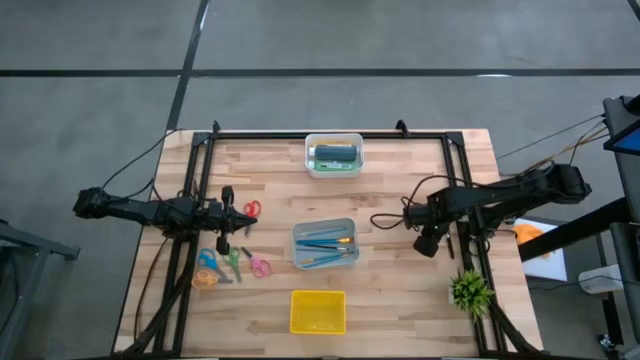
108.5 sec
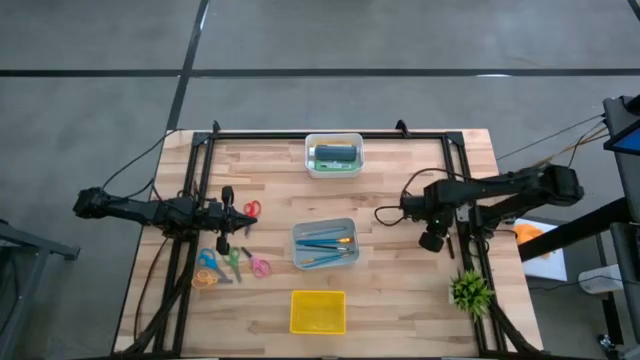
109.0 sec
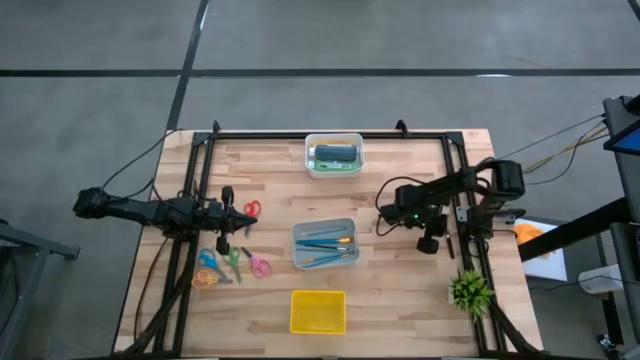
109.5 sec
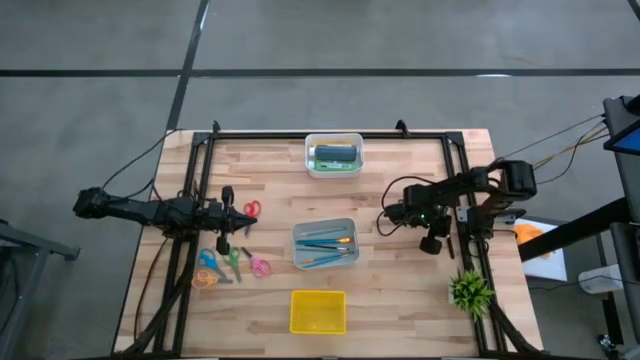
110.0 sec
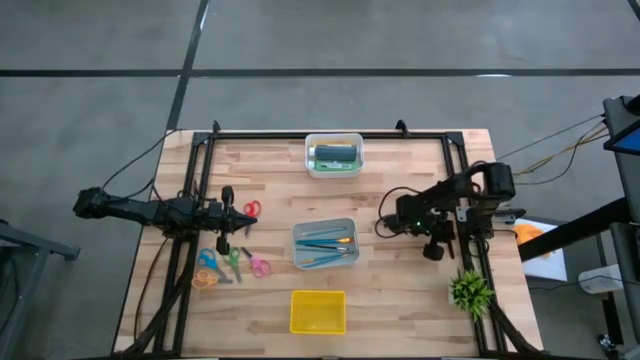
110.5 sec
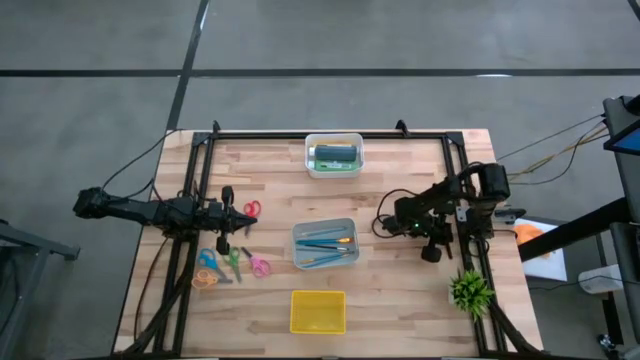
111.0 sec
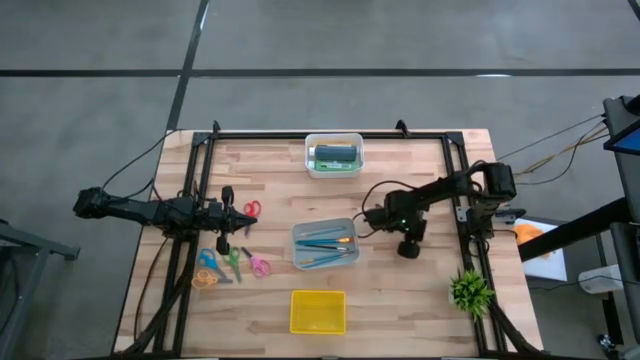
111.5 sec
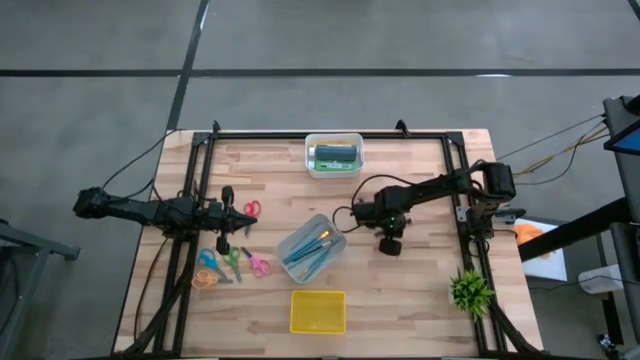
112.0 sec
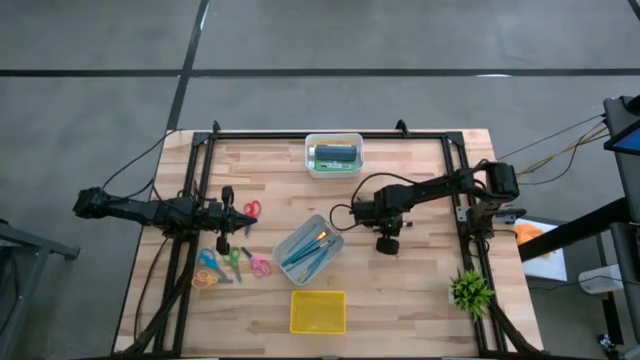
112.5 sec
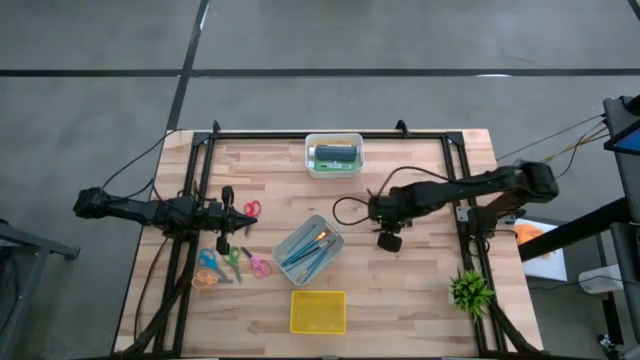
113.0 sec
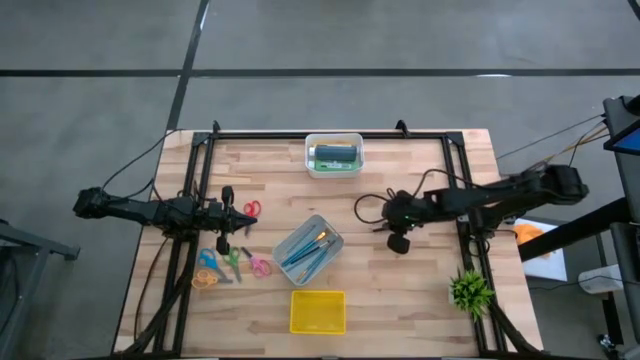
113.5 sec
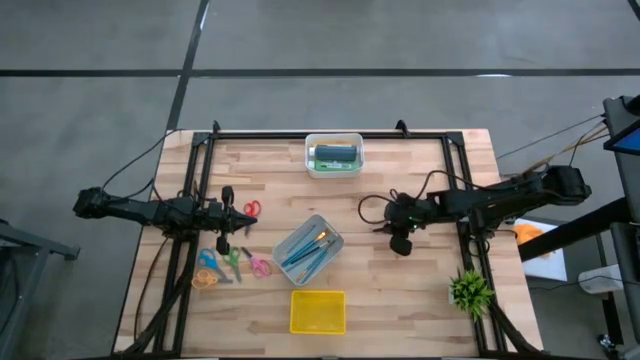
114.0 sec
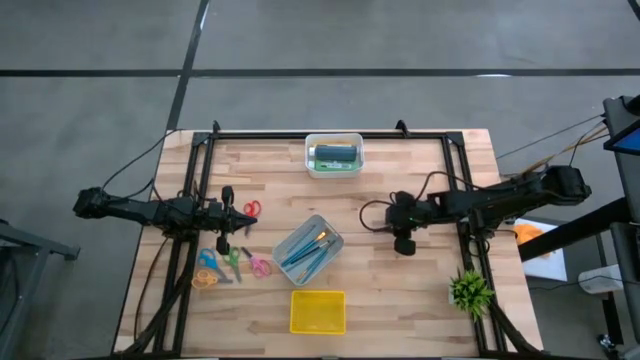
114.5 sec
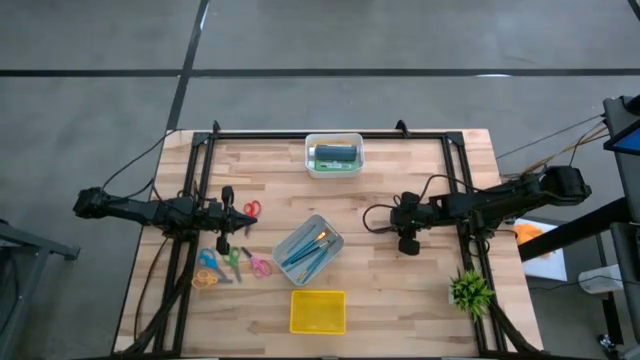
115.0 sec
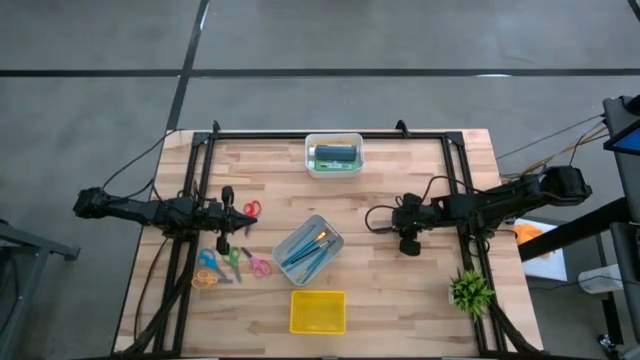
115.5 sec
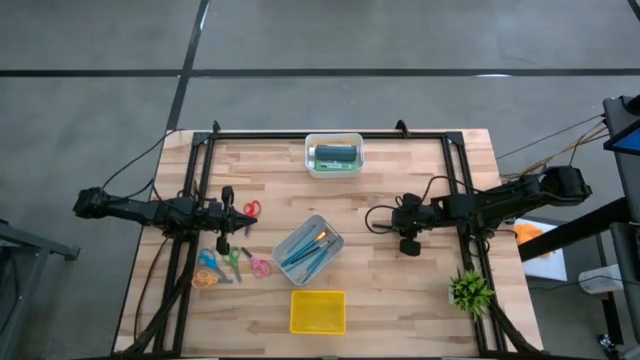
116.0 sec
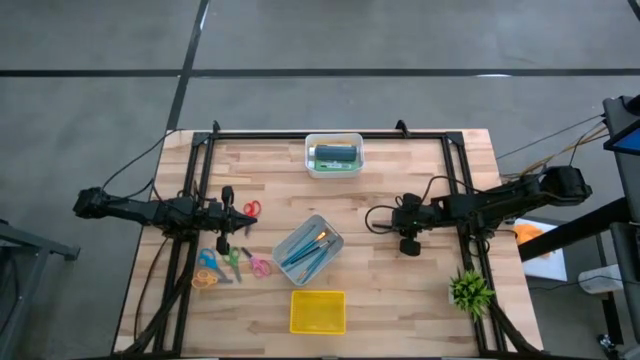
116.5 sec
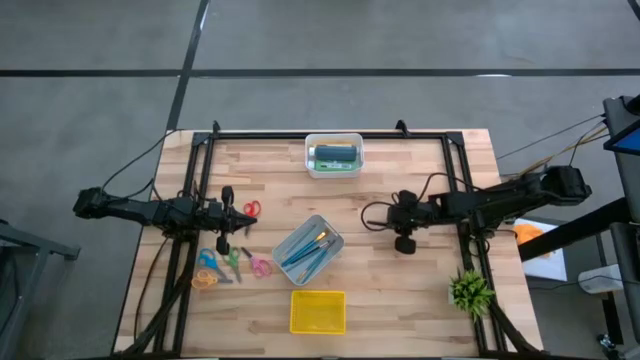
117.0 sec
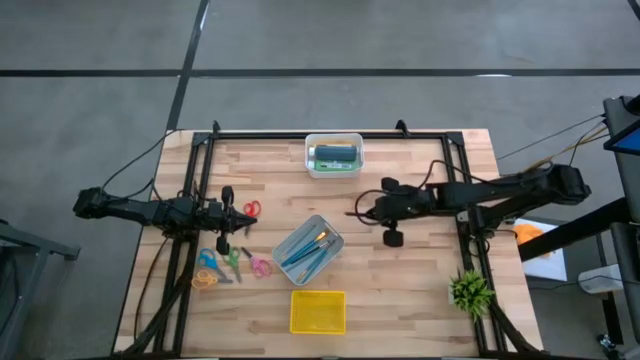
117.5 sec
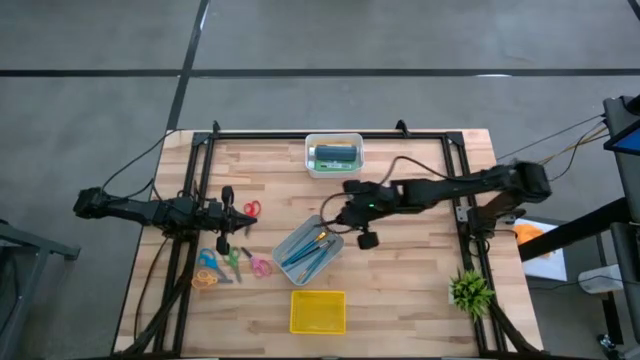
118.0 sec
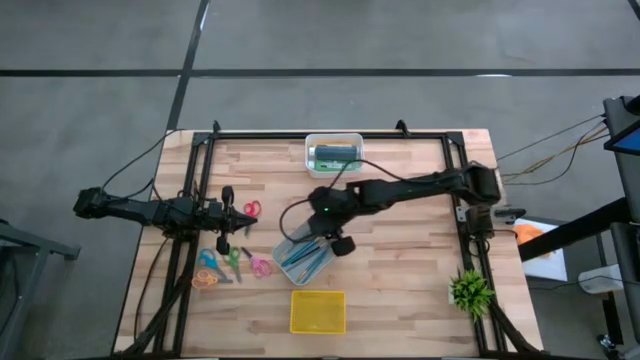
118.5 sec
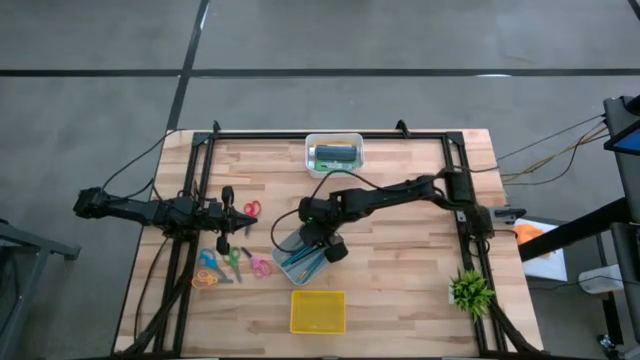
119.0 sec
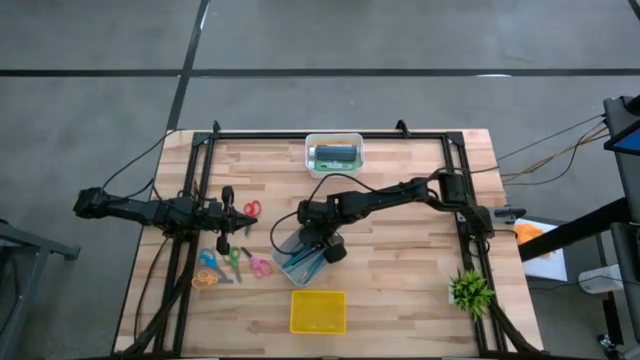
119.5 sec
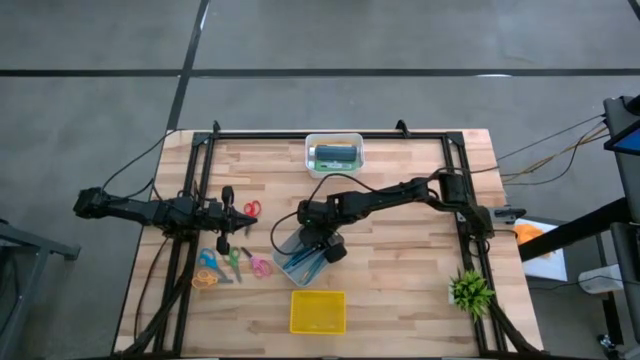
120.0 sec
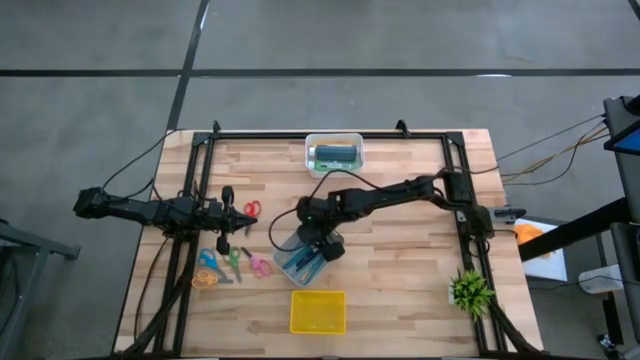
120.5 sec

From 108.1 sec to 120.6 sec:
Task: Pick & Place Paint Supplies
Put the black paint brush into the gray bin

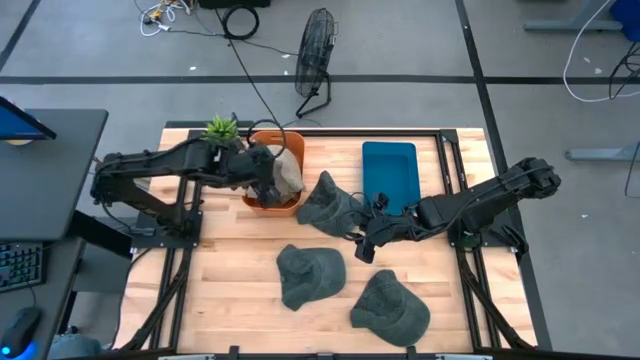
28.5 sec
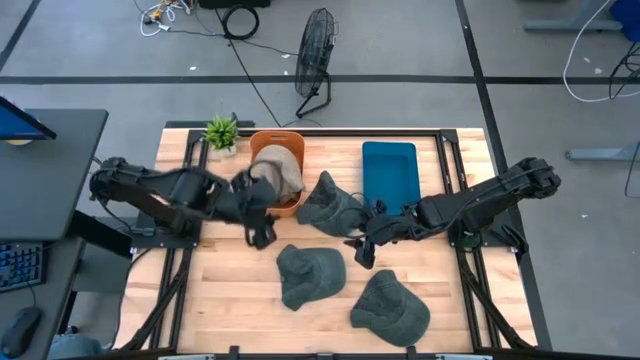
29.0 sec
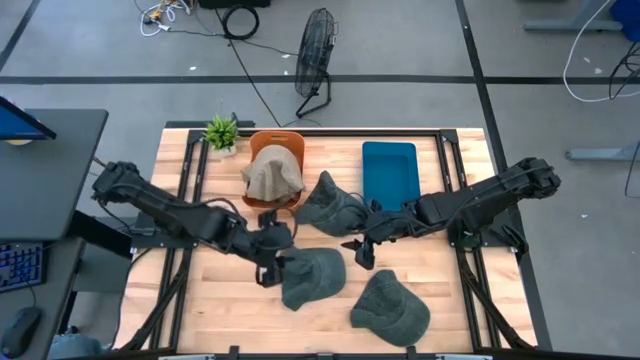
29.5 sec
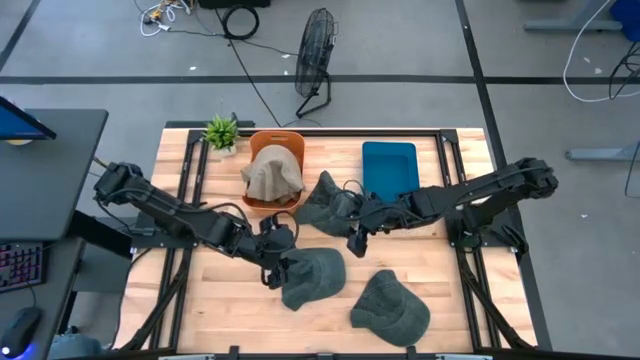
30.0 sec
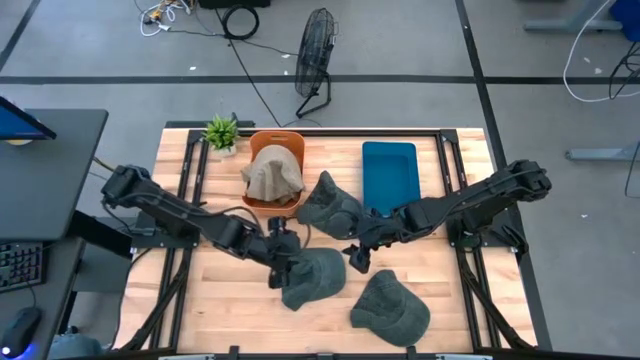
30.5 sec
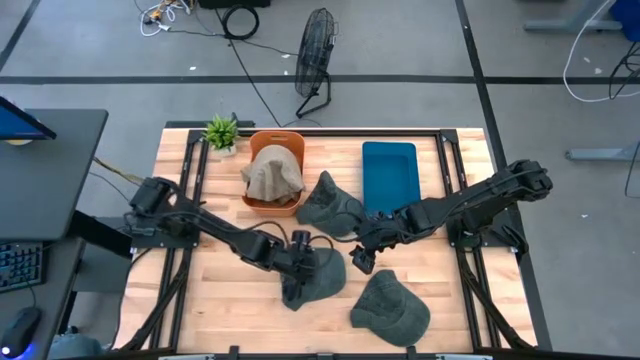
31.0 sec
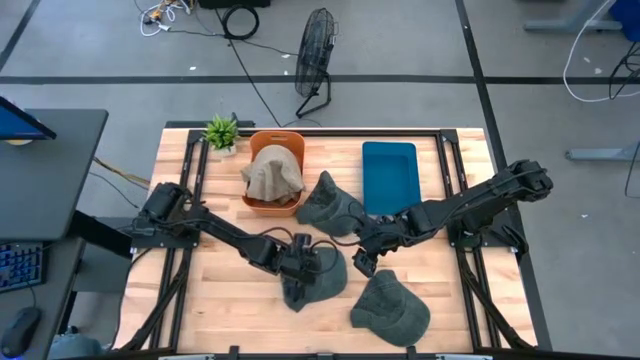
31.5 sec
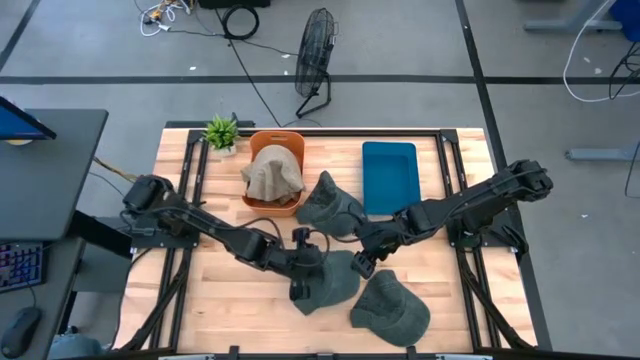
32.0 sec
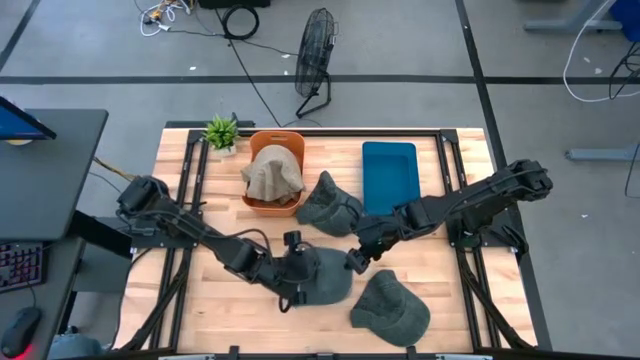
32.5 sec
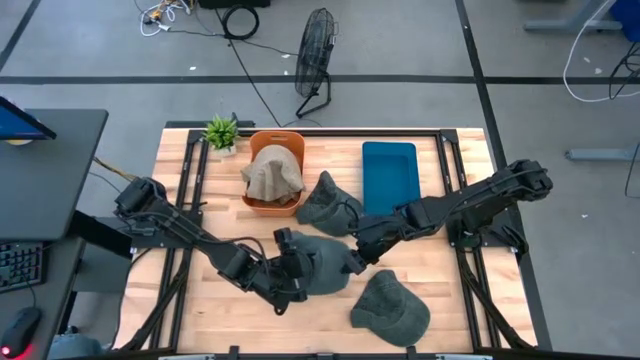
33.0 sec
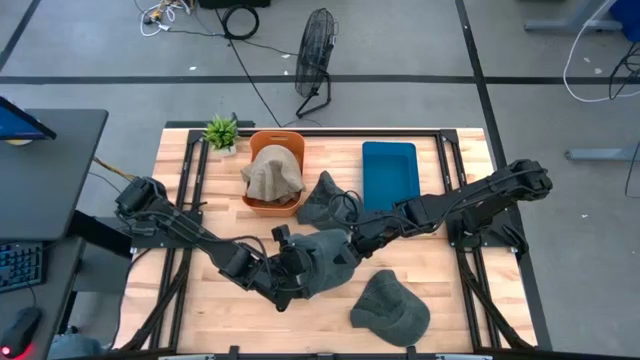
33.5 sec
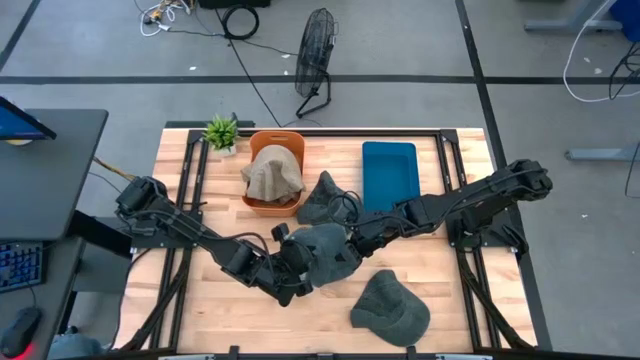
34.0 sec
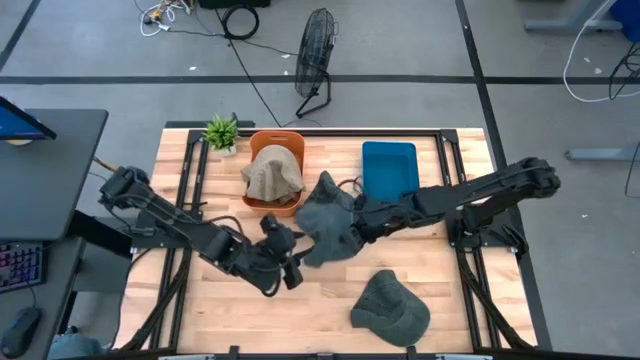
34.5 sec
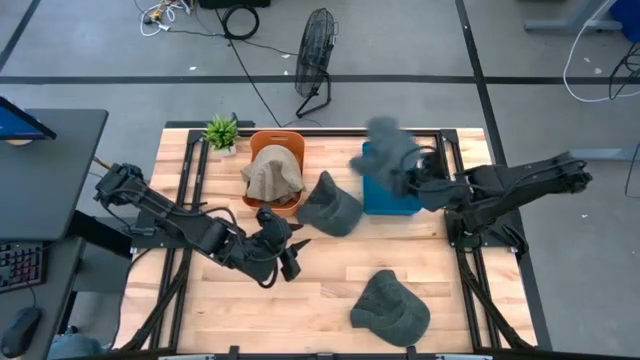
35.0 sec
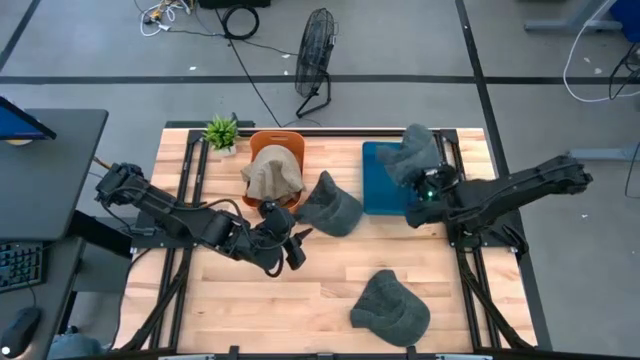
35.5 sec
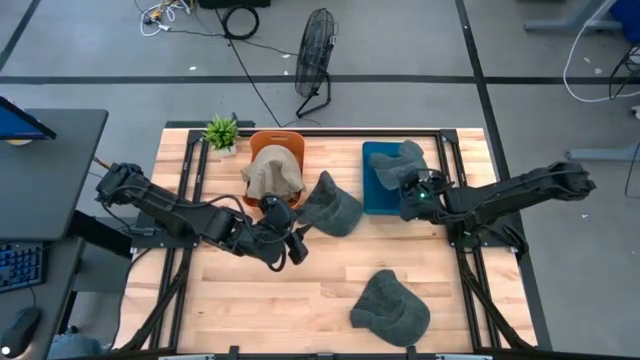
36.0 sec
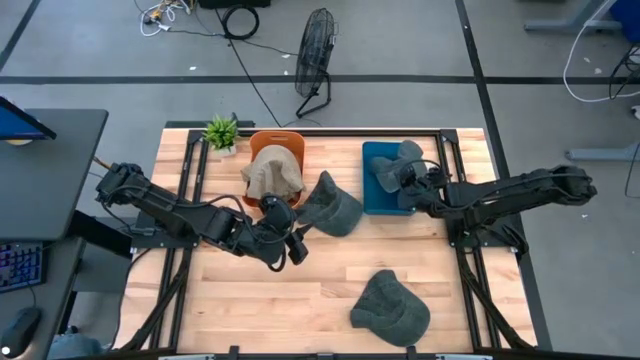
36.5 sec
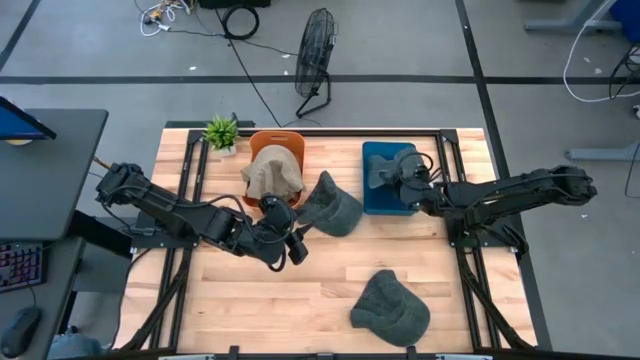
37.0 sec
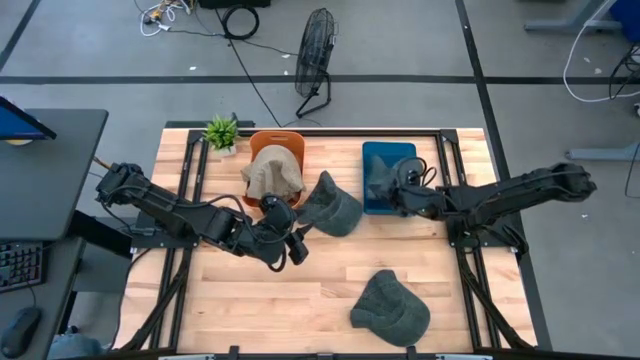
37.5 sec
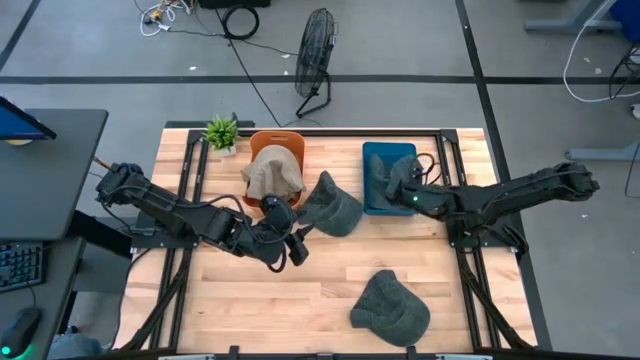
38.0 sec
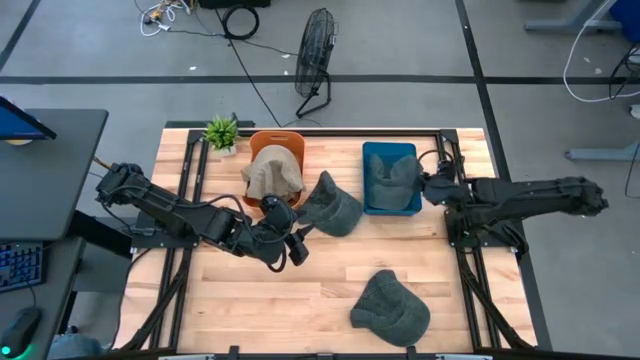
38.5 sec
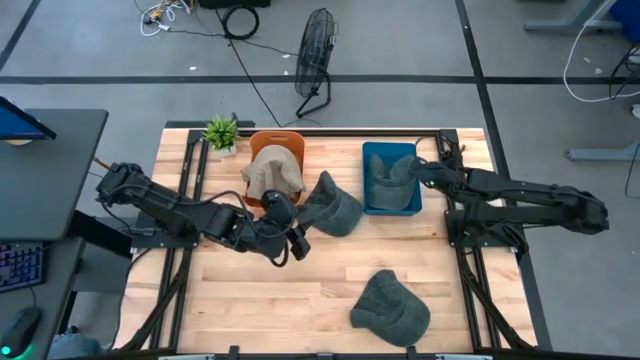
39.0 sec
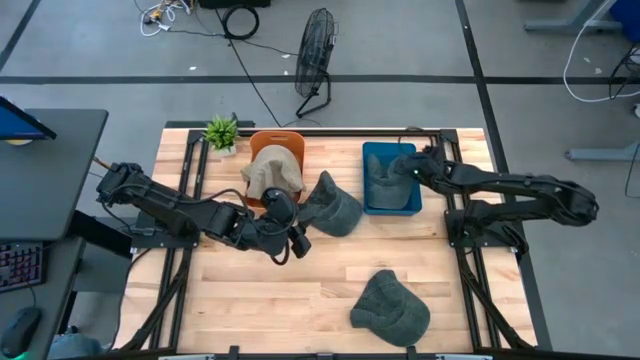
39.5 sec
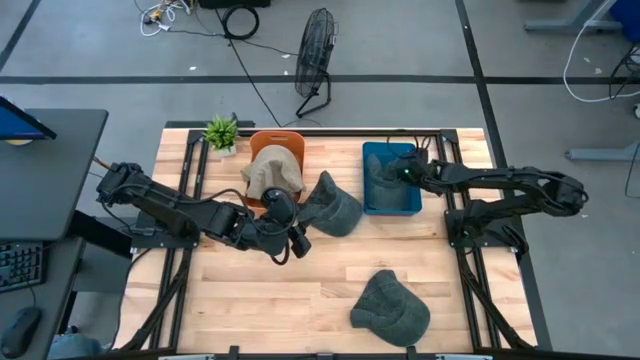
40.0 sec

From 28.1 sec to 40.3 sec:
Task: Pick & Place hat
Put the middle left black cap into the blue bin
